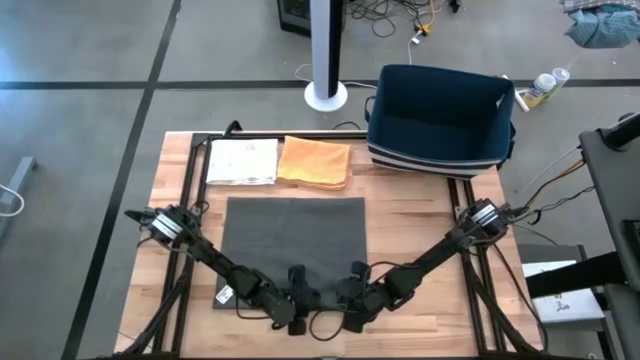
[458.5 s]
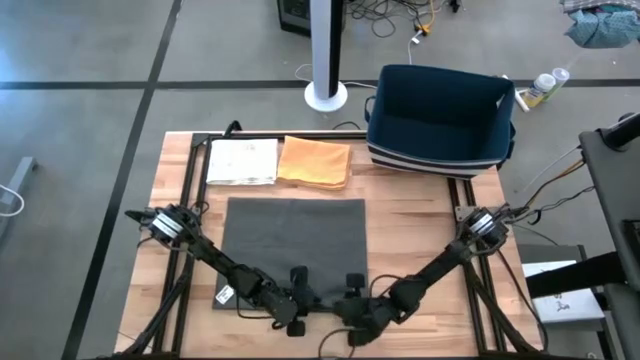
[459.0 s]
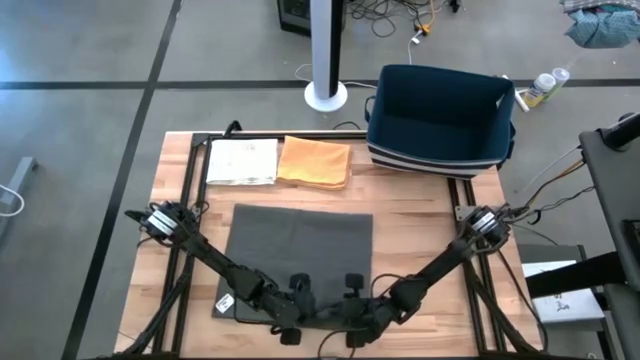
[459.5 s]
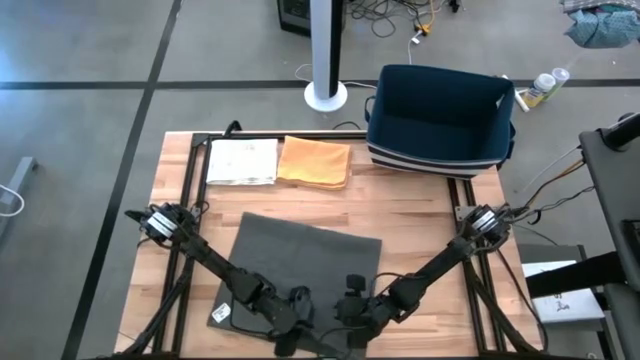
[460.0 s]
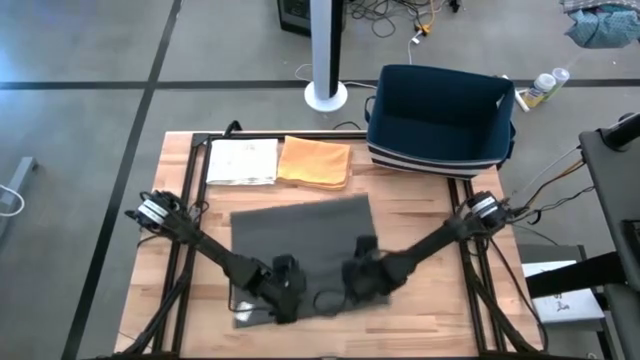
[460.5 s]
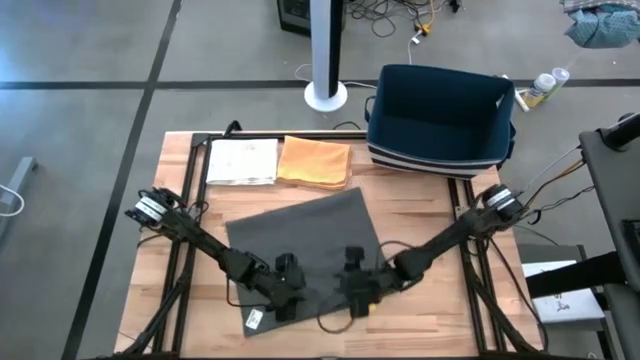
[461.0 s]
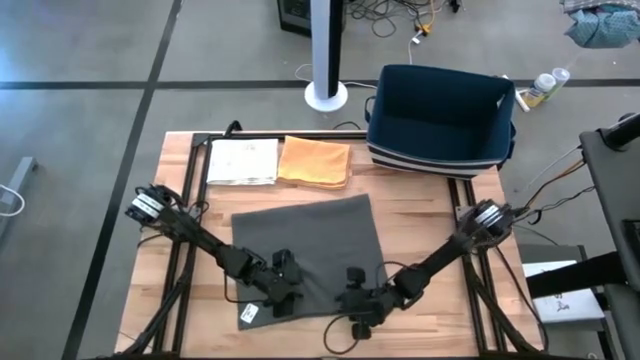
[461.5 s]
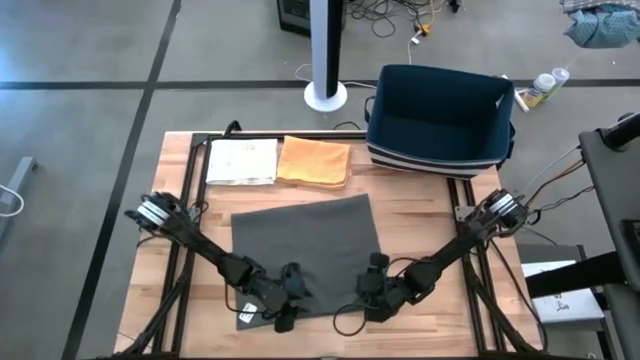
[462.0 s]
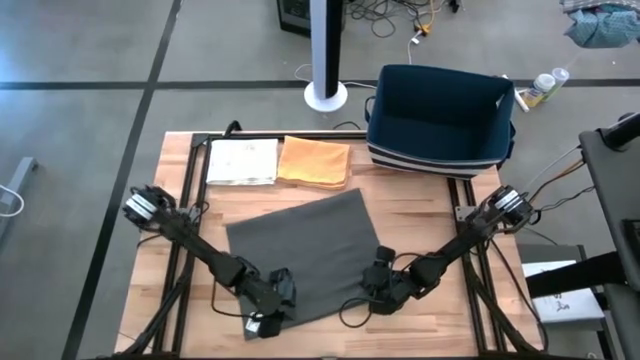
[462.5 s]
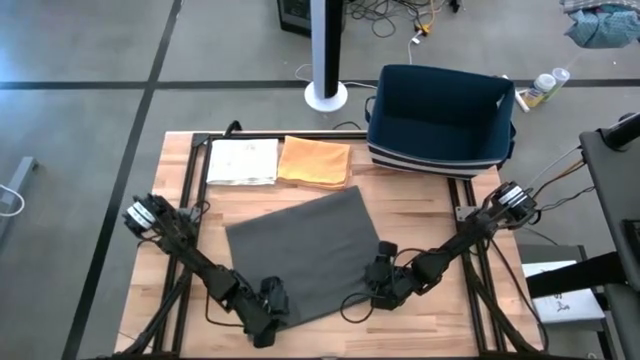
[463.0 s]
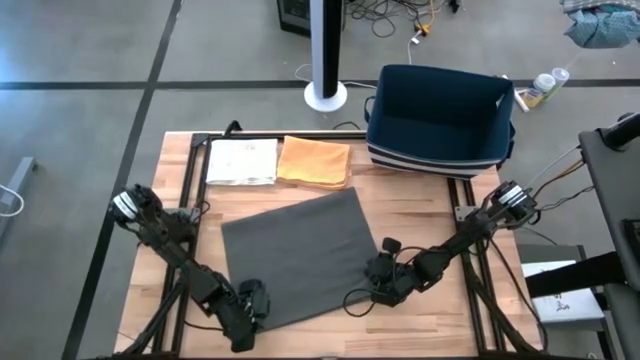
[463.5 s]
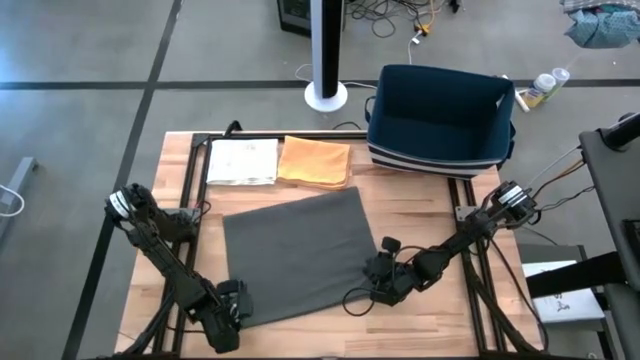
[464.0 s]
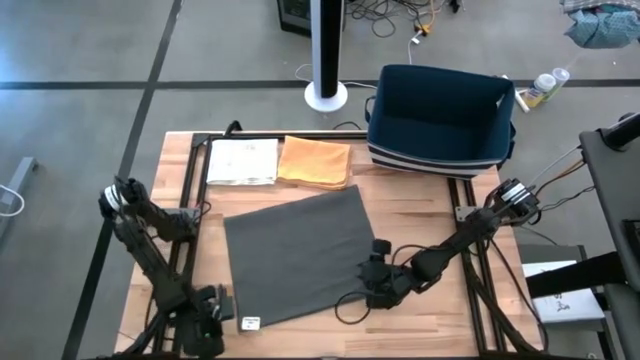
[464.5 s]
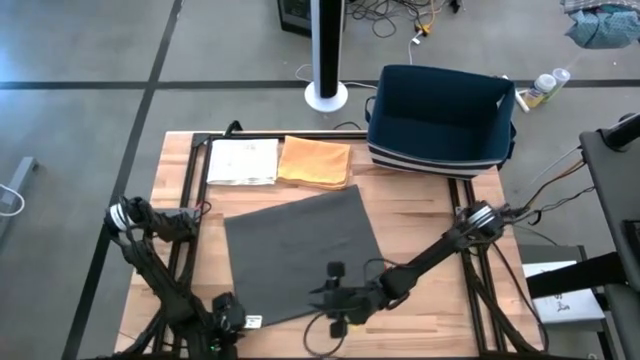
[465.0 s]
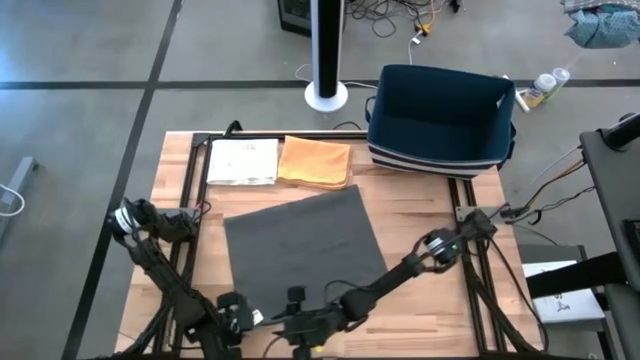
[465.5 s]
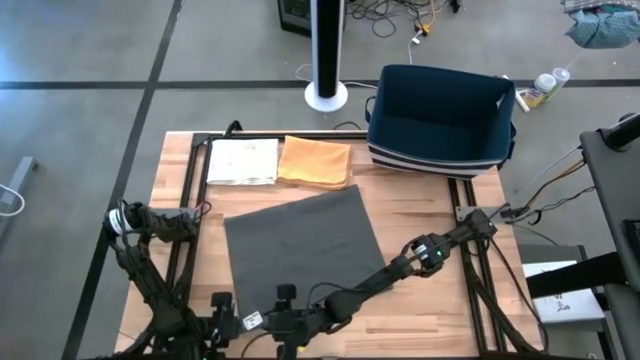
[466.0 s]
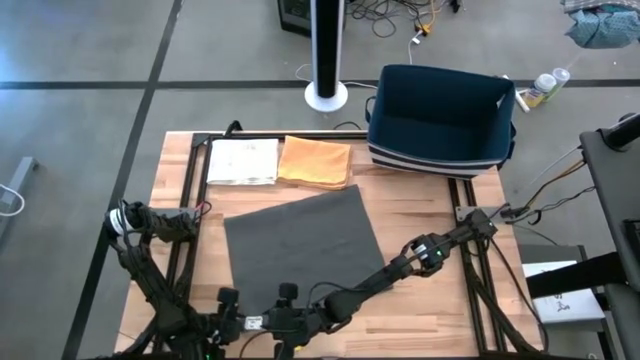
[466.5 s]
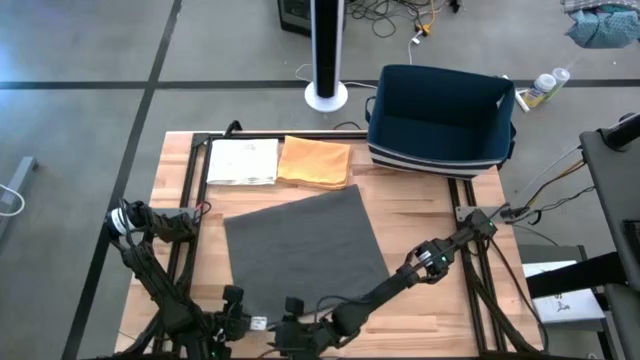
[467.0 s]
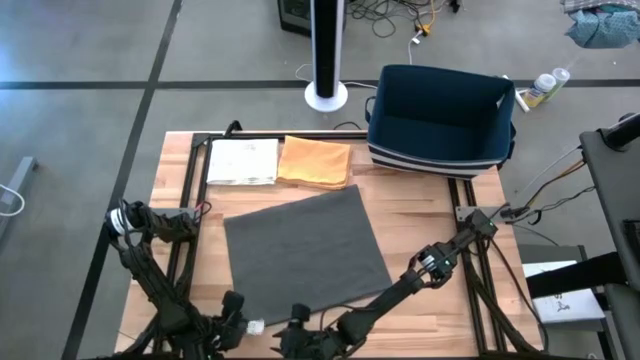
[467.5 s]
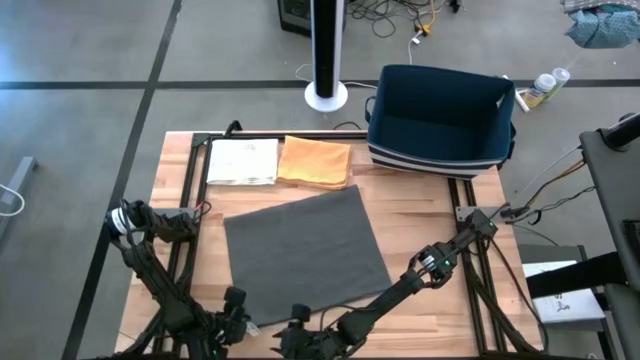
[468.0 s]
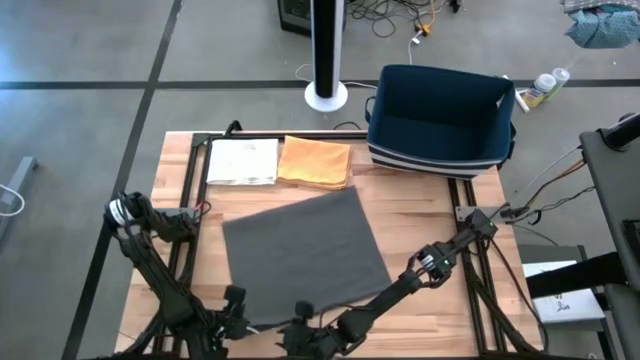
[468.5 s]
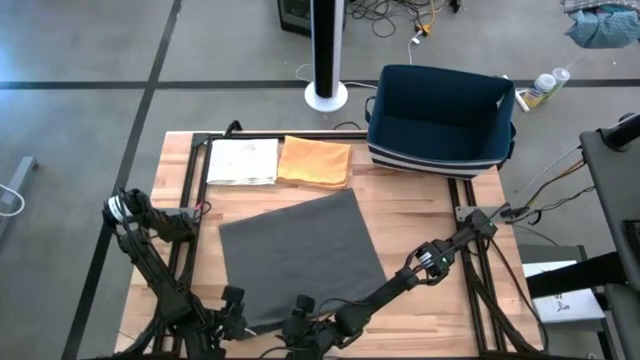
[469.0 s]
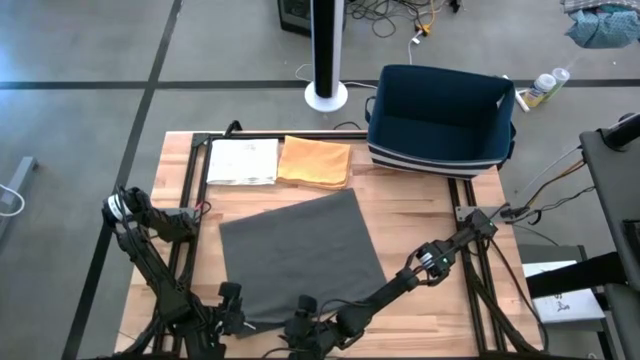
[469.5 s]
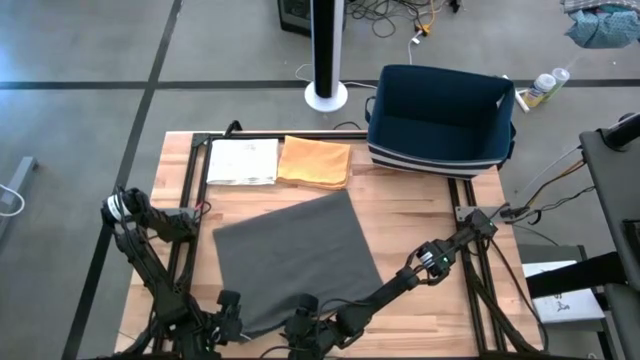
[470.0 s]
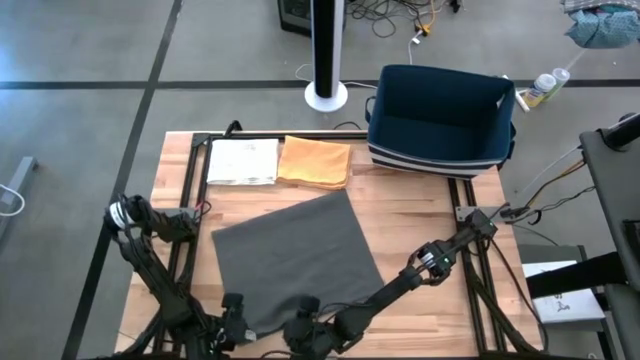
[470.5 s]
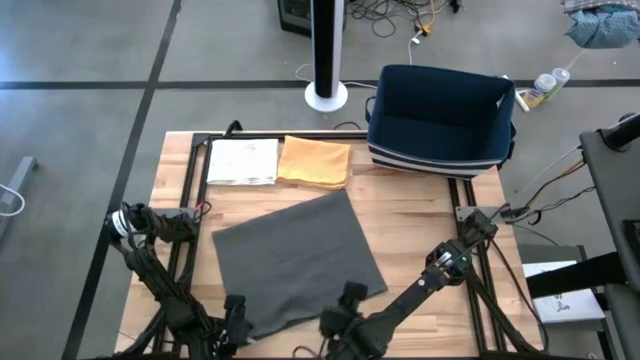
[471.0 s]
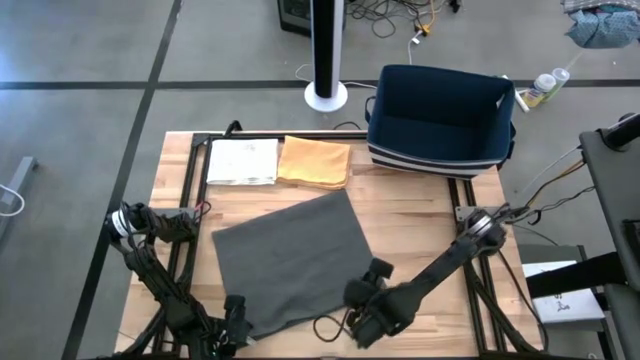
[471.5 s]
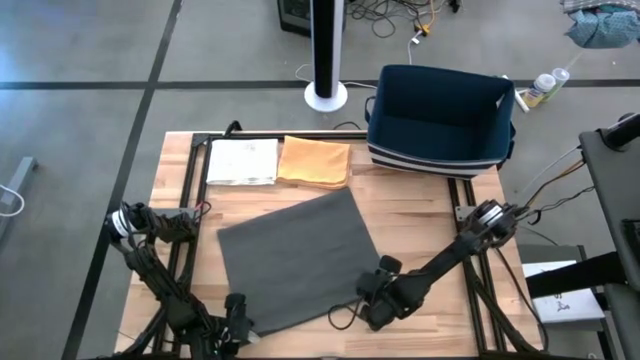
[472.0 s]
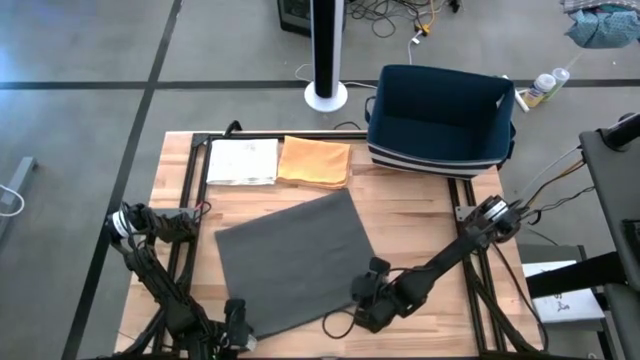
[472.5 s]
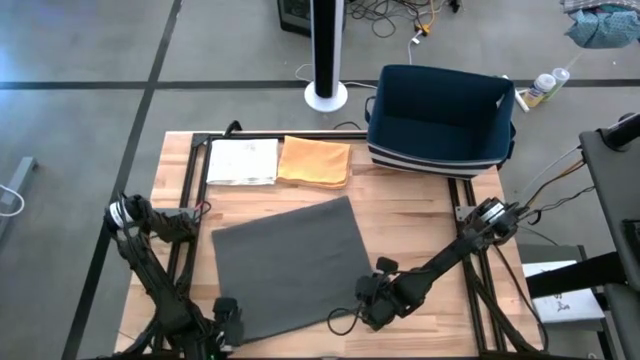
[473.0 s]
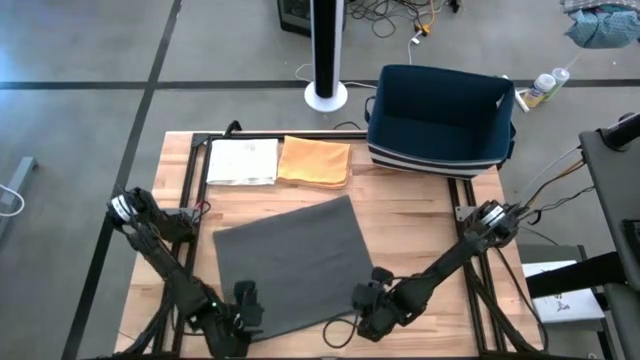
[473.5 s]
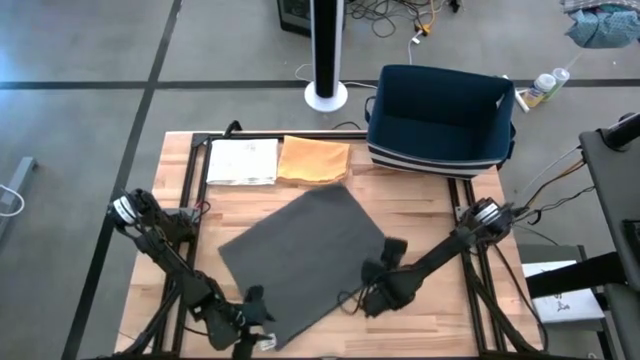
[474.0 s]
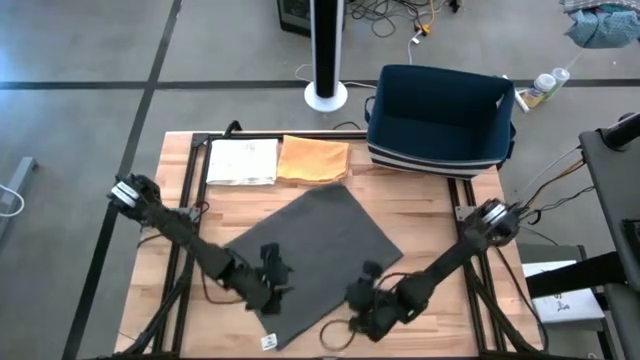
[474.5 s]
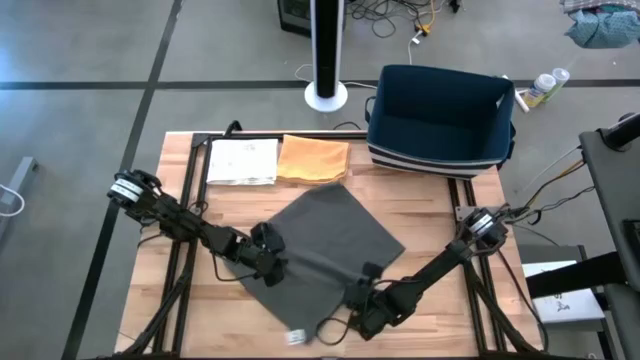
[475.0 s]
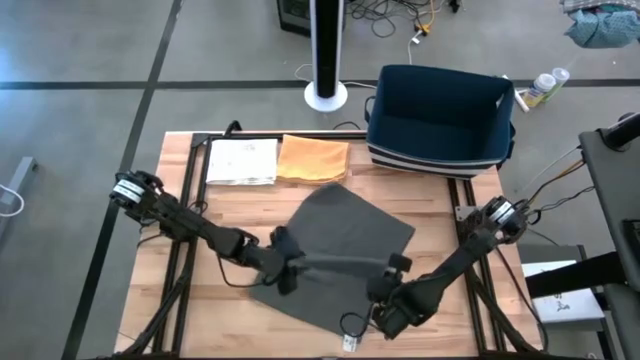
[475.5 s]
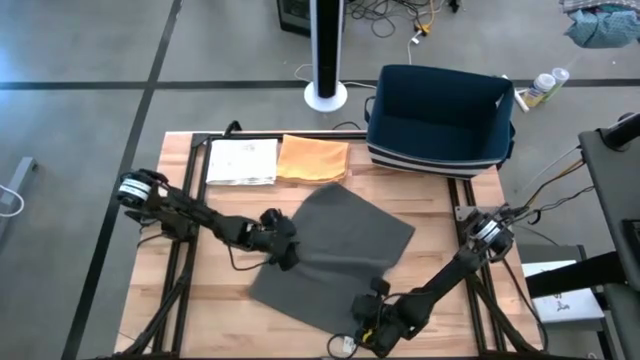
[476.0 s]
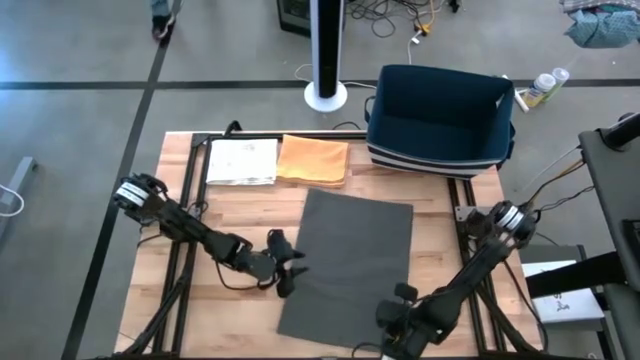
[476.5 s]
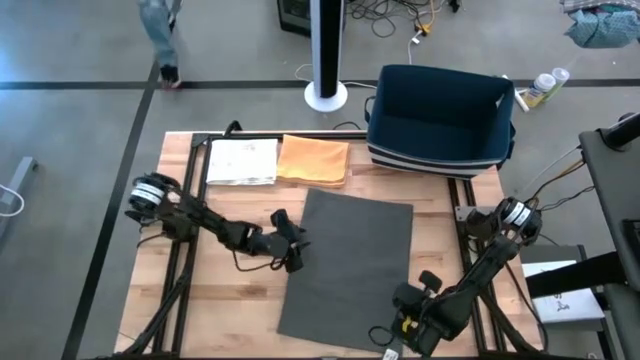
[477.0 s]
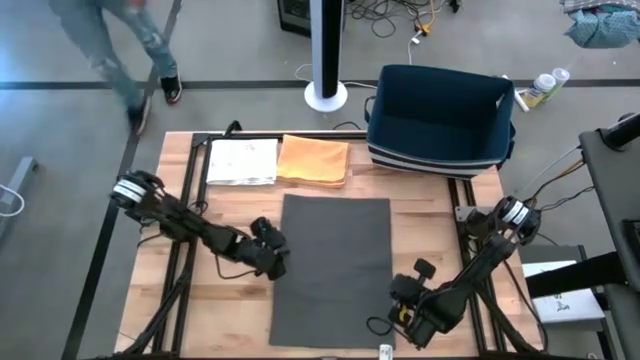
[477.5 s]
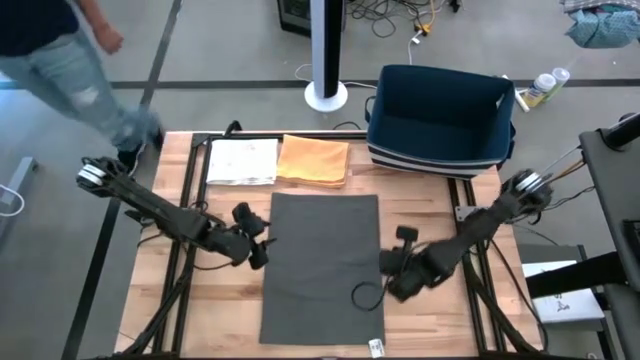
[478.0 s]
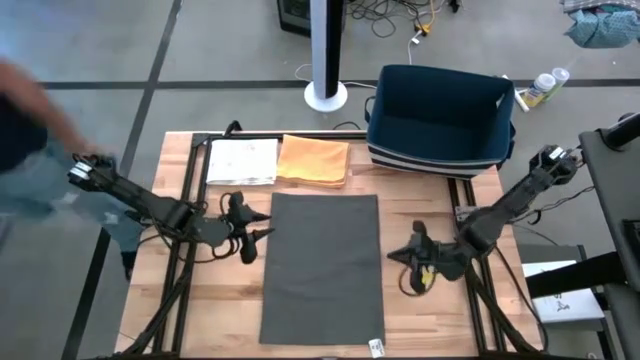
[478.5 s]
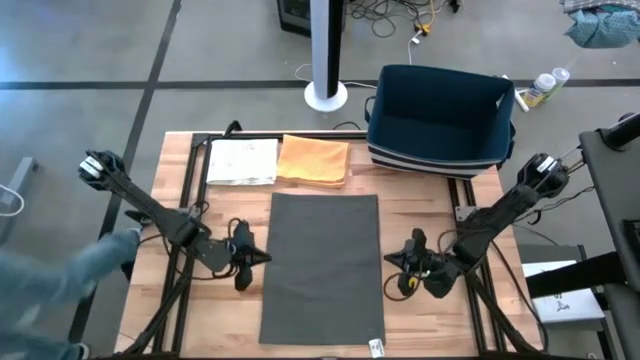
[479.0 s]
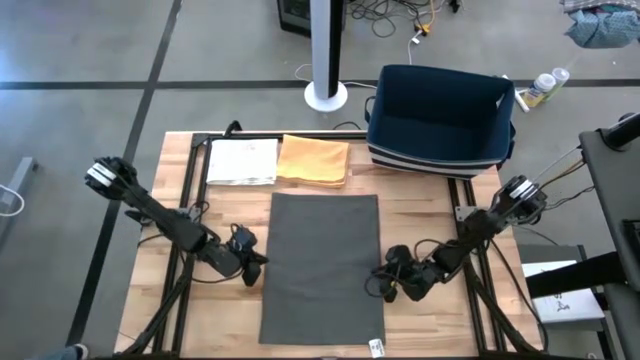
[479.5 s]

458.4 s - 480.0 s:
Task: Fold towel
Fold the black towel
